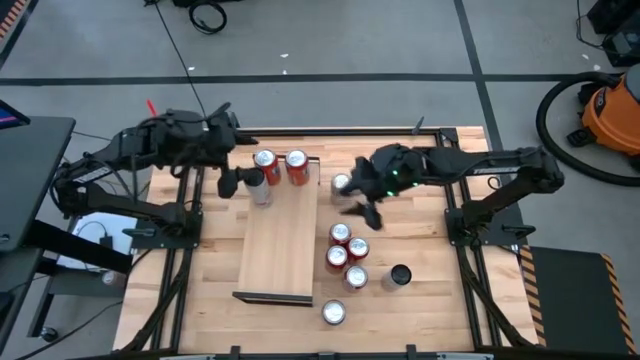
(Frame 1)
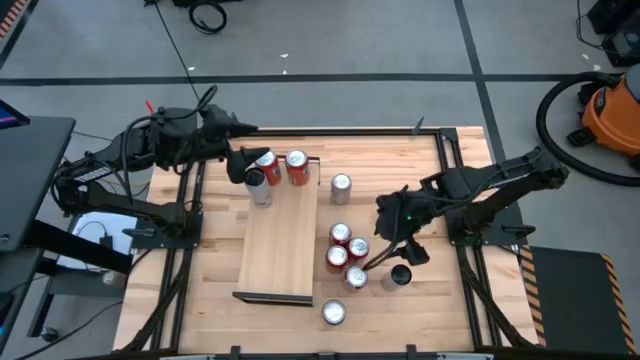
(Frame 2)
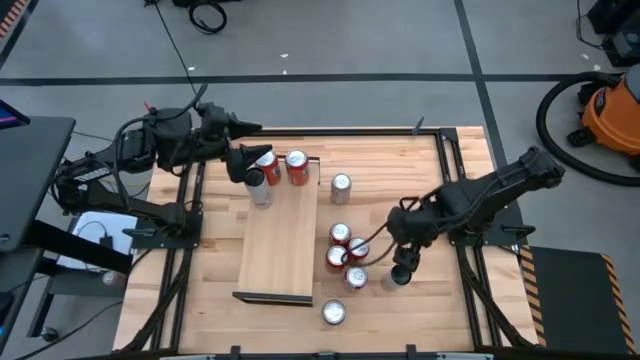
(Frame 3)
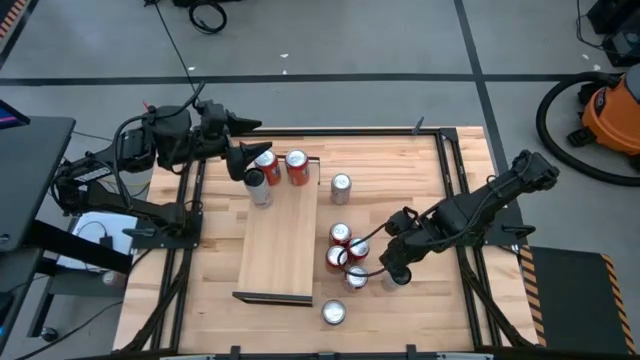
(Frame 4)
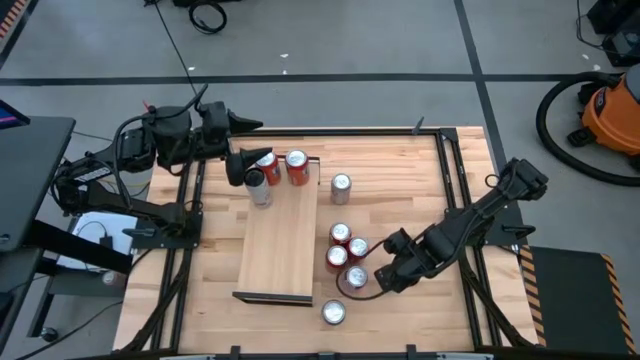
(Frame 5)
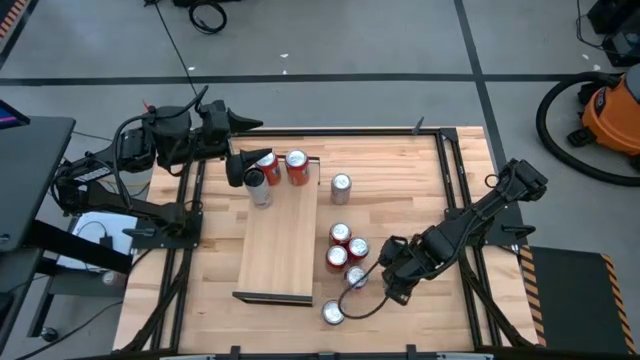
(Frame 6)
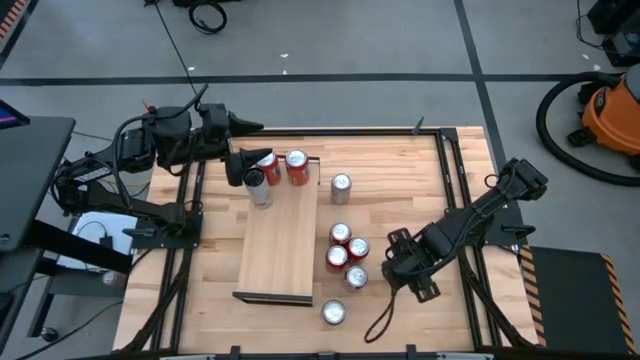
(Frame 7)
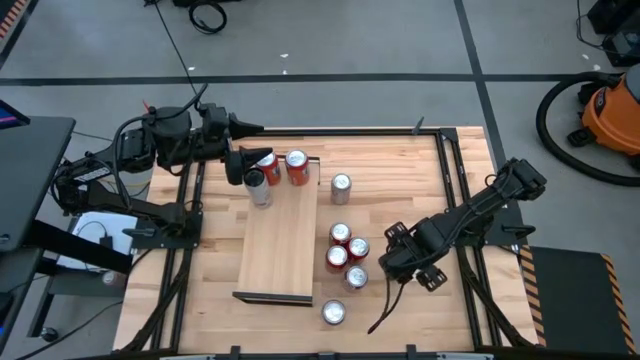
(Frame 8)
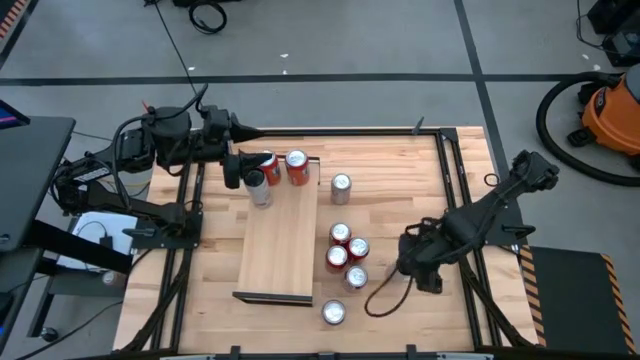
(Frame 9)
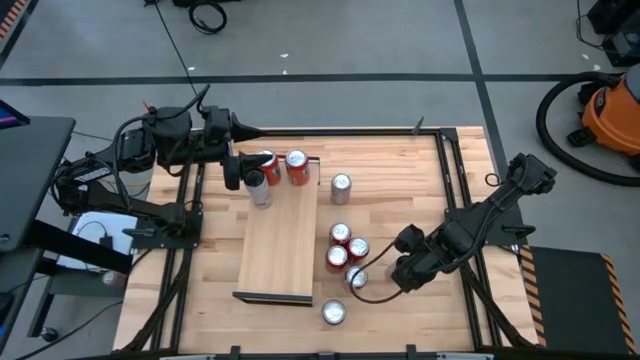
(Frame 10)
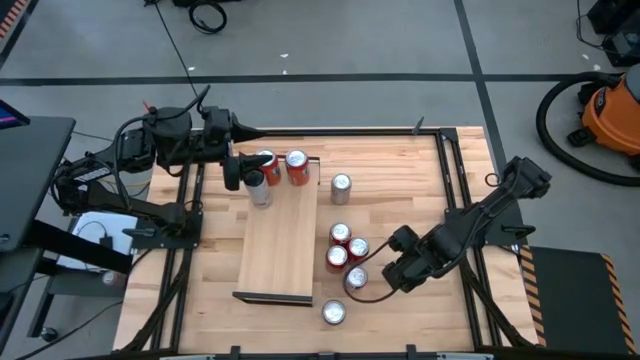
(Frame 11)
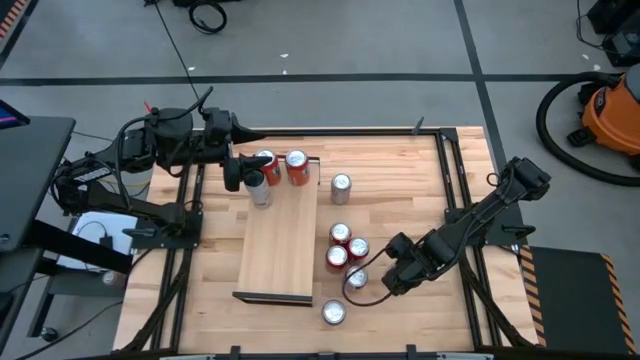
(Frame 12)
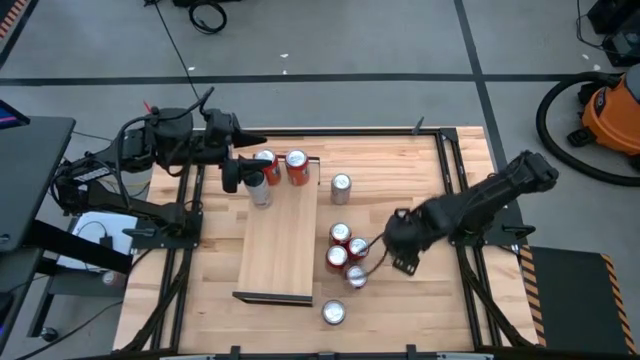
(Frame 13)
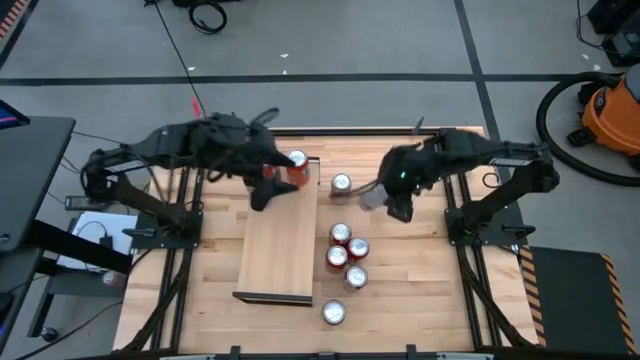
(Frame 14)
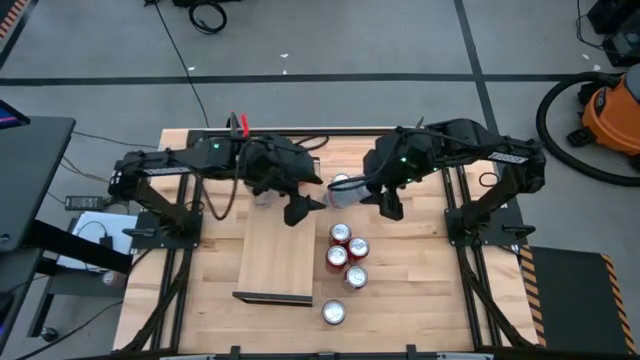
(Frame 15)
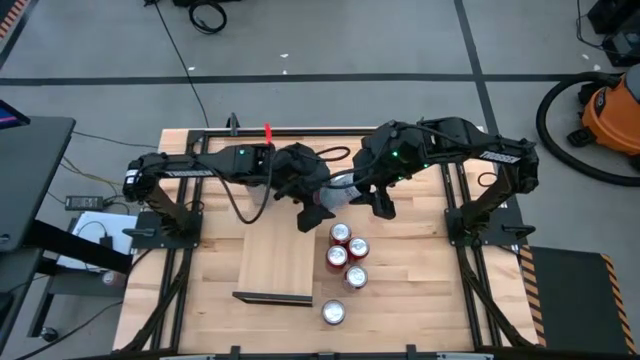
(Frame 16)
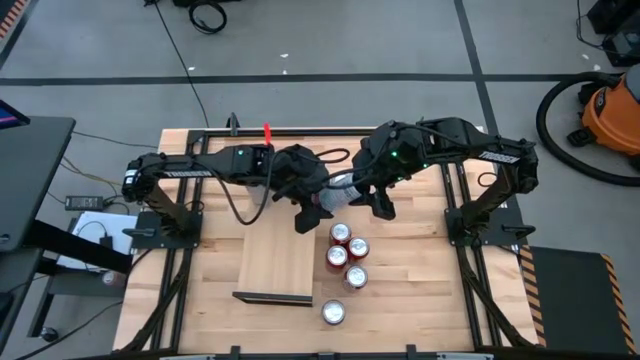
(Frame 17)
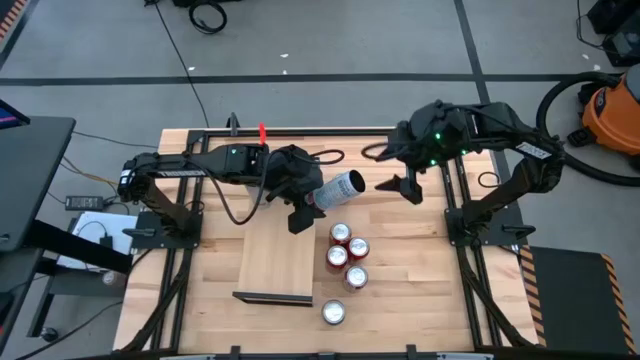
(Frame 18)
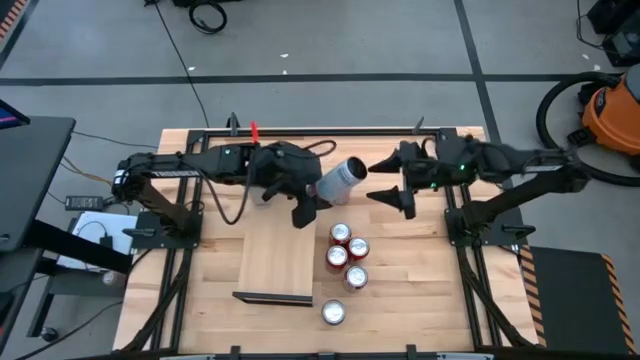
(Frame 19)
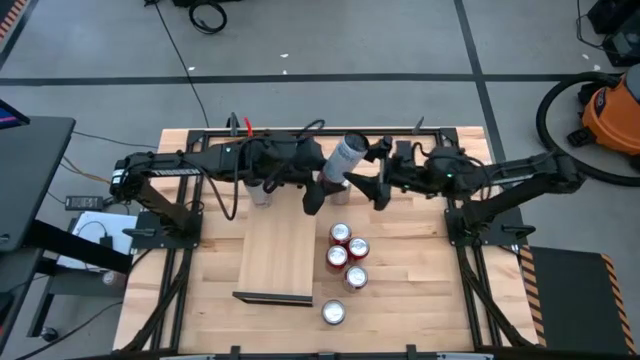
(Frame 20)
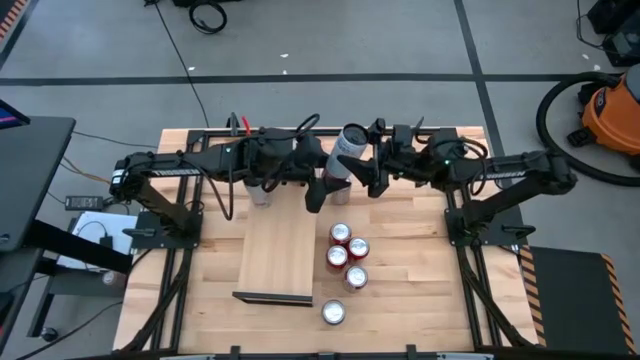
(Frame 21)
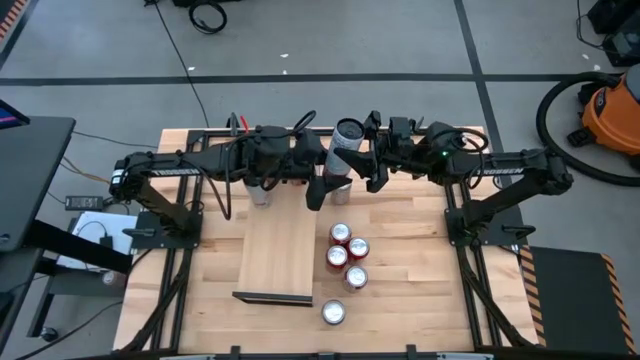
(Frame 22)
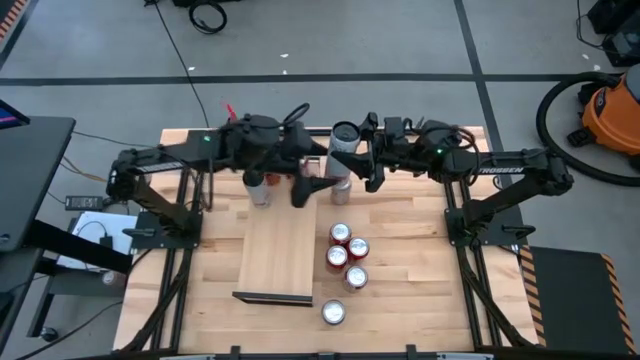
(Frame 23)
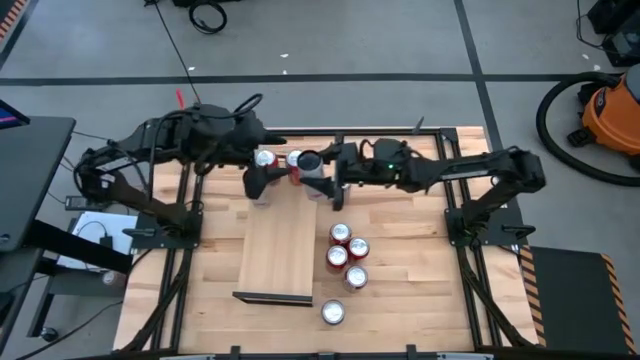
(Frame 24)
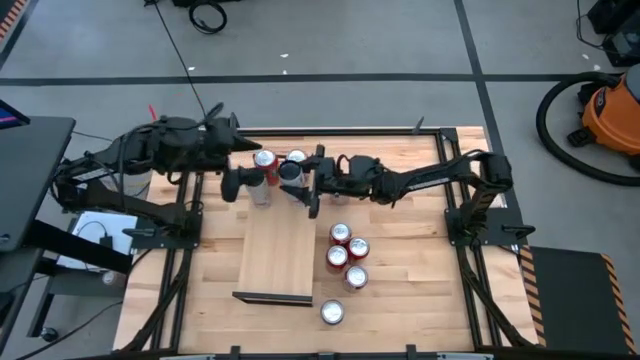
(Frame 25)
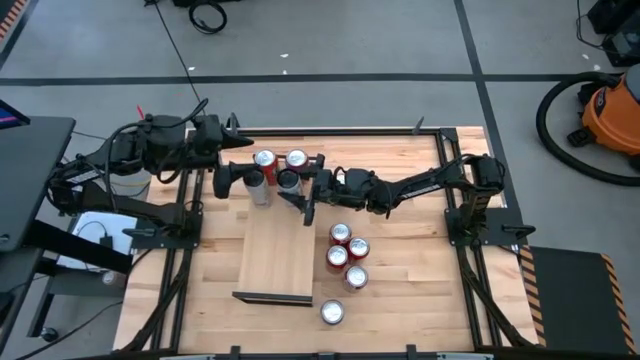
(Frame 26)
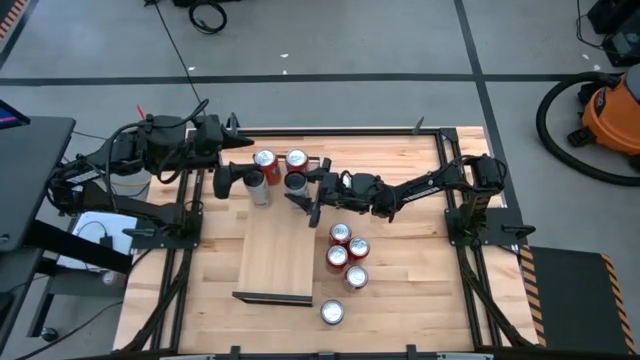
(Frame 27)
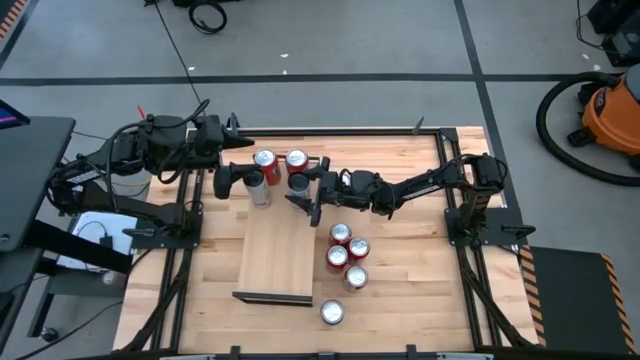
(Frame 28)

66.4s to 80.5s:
Task: Place canned beverage on shelf
Put the white and orange soda can aligned with the other white and orange soda can on the shelf

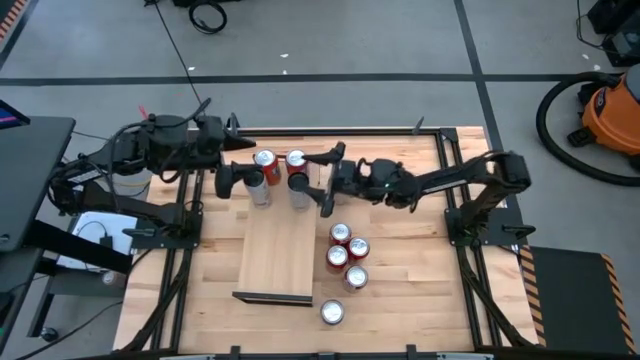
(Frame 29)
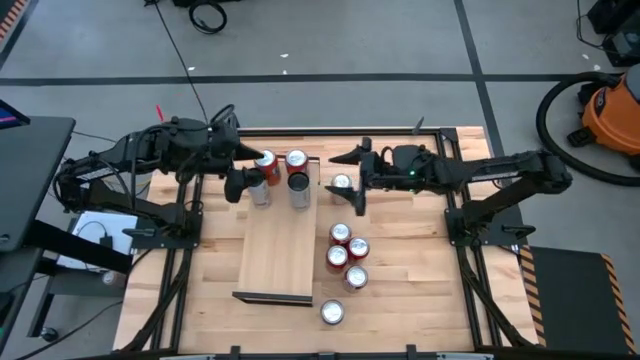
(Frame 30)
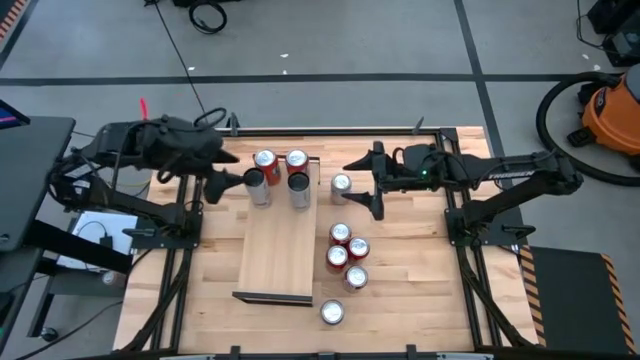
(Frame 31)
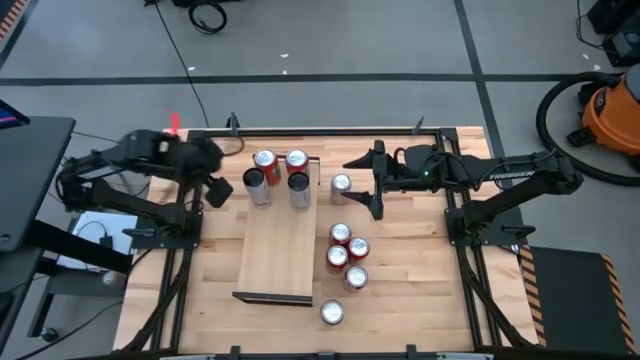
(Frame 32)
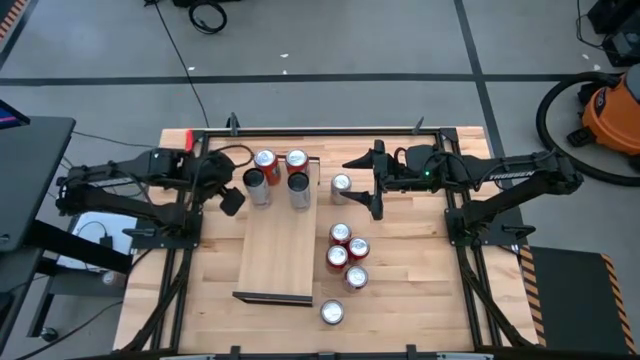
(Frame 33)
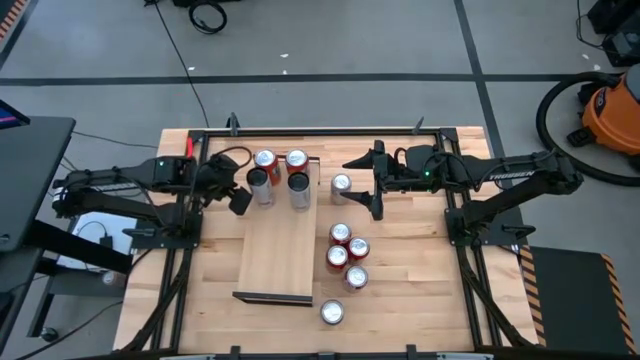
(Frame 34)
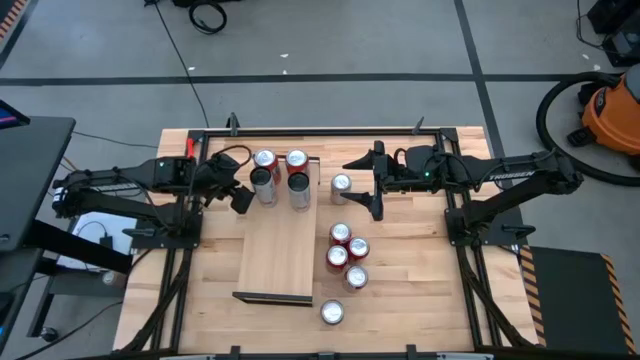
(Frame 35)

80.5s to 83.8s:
Adjust the left white and orange soda can

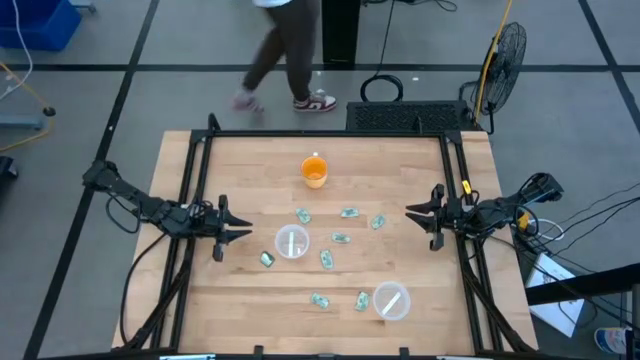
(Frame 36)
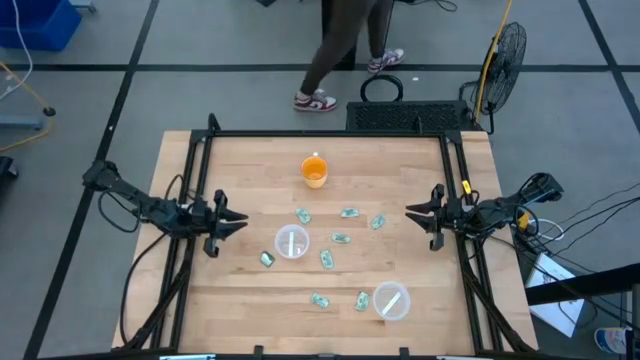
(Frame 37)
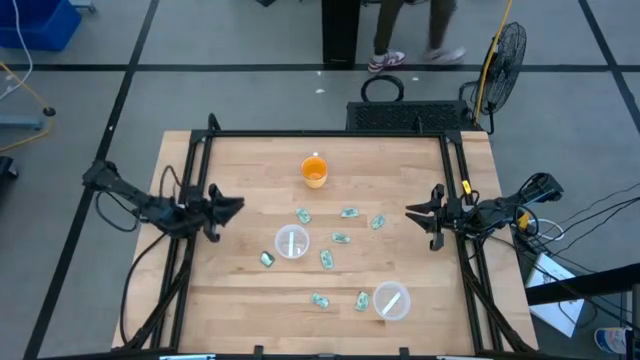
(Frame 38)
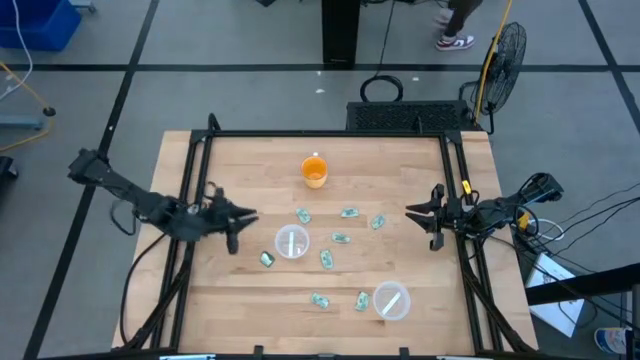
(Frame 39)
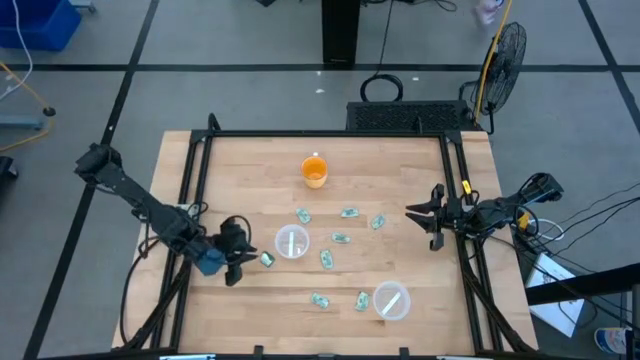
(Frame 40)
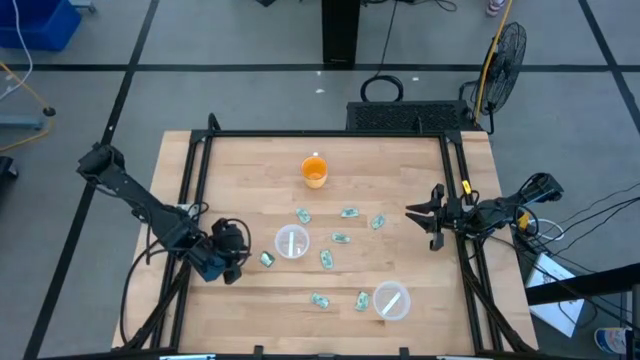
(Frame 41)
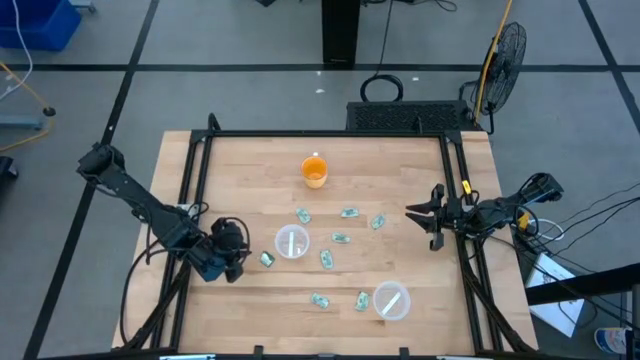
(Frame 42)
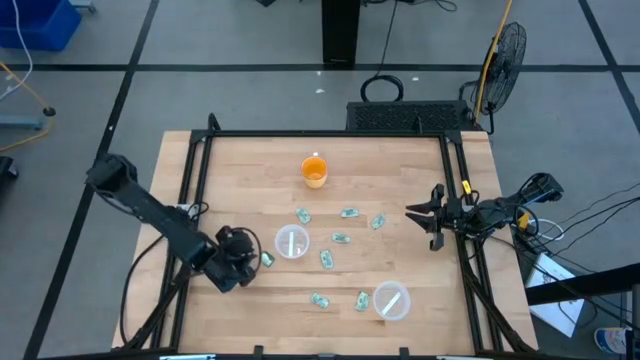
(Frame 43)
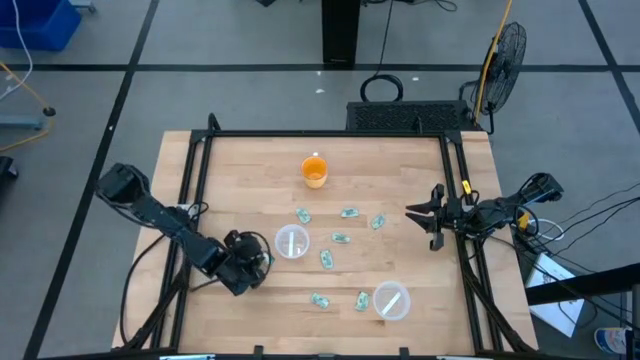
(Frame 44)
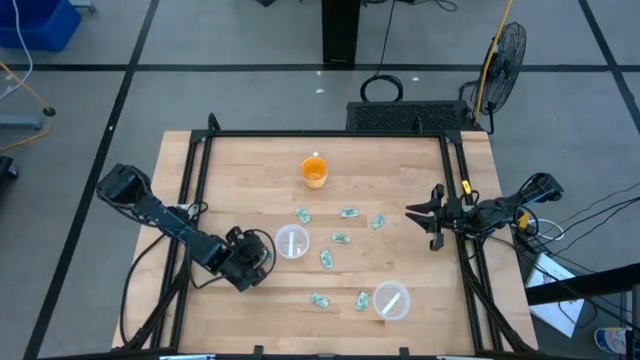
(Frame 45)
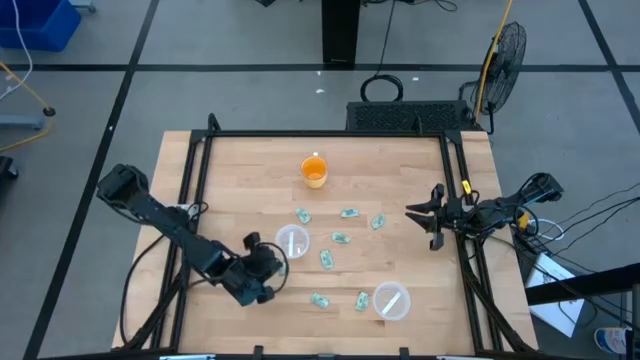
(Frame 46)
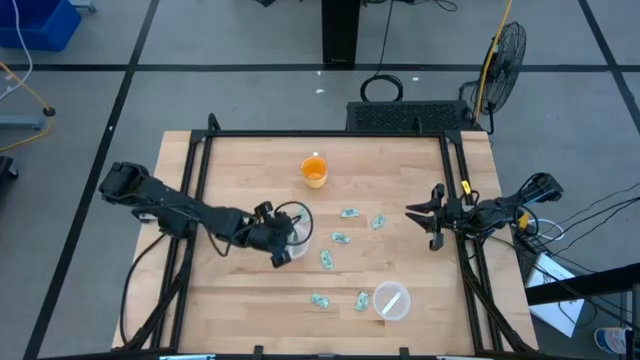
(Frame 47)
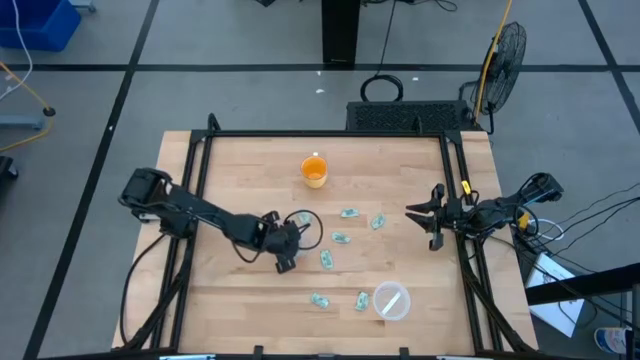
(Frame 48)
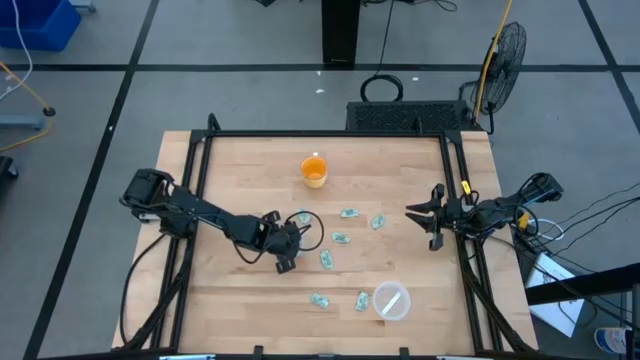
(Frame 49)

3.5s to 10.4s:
Task: Pick and place Stevia / Truvia into bins
Put the green truvia packet into the top transparent container
